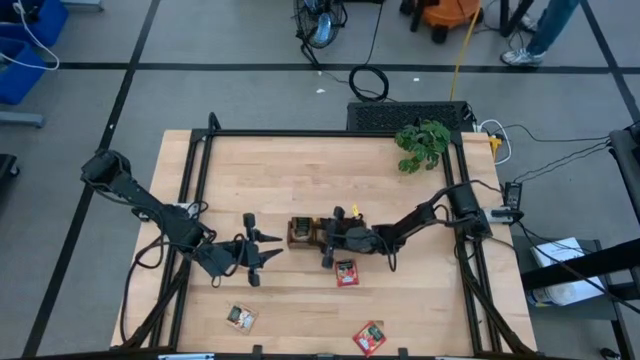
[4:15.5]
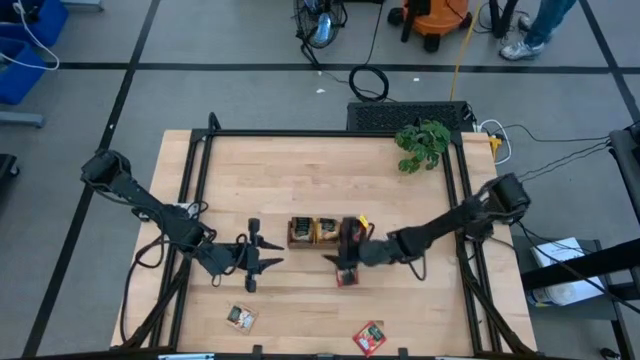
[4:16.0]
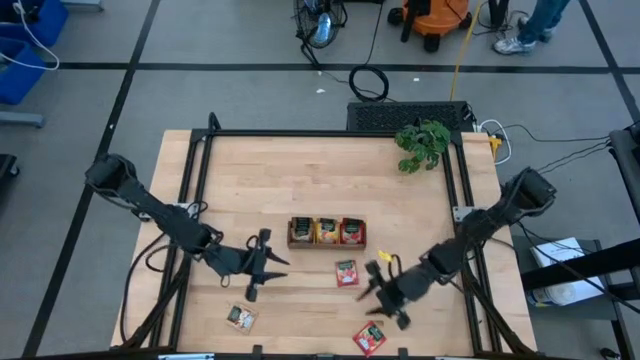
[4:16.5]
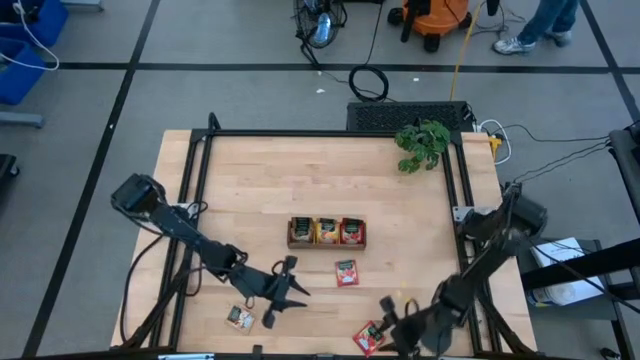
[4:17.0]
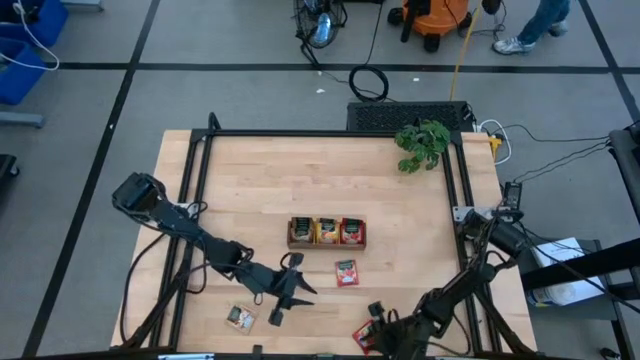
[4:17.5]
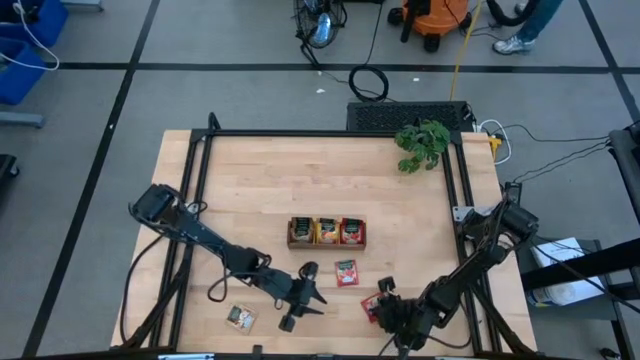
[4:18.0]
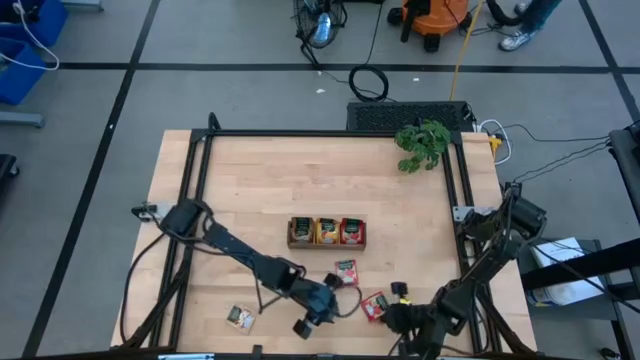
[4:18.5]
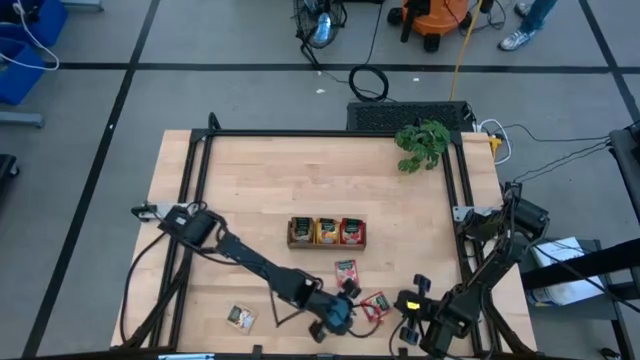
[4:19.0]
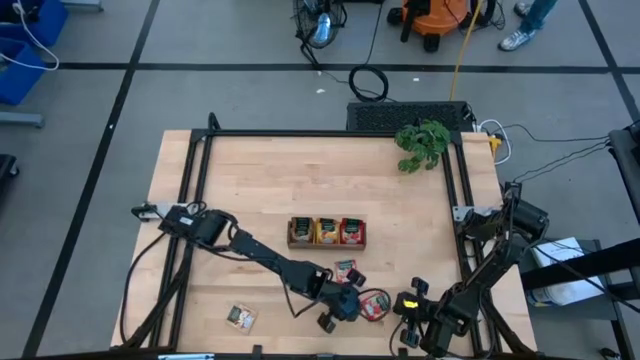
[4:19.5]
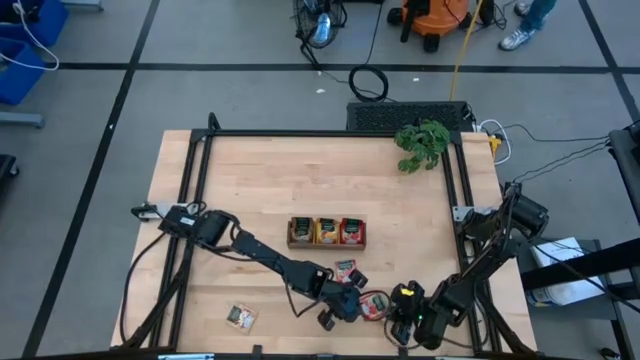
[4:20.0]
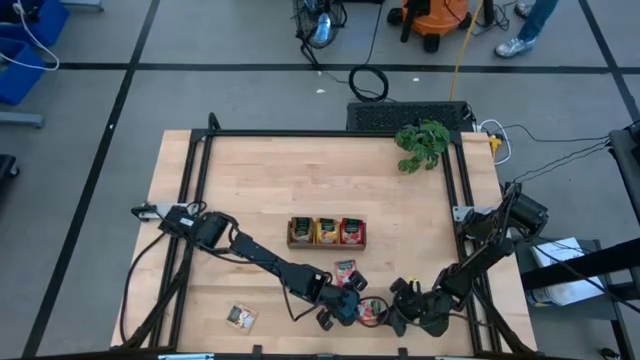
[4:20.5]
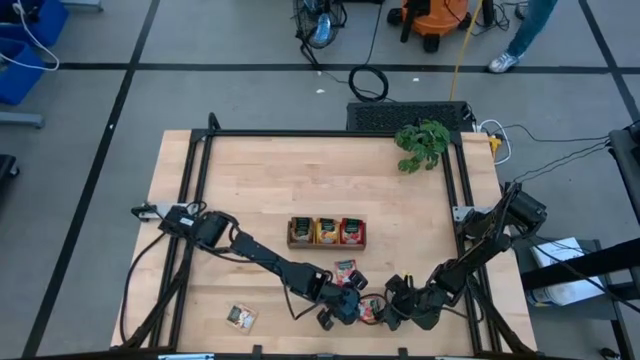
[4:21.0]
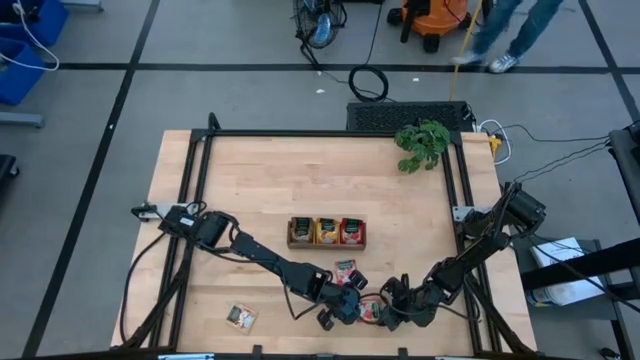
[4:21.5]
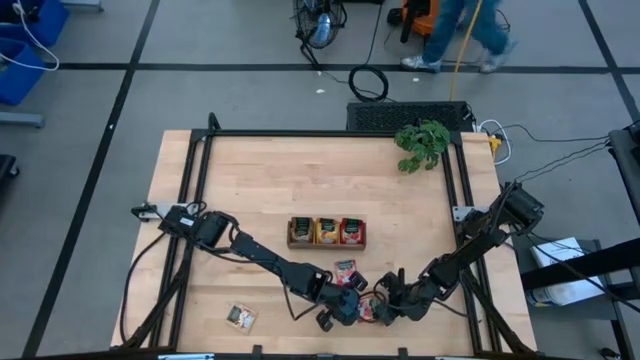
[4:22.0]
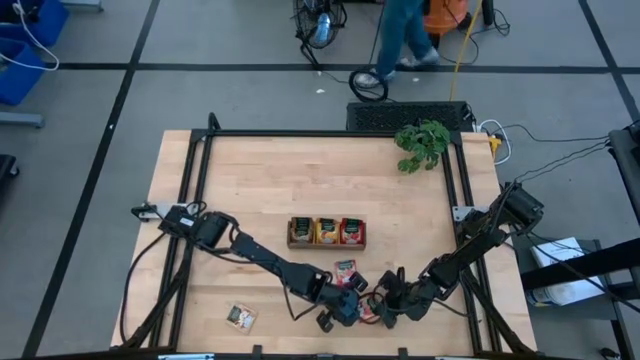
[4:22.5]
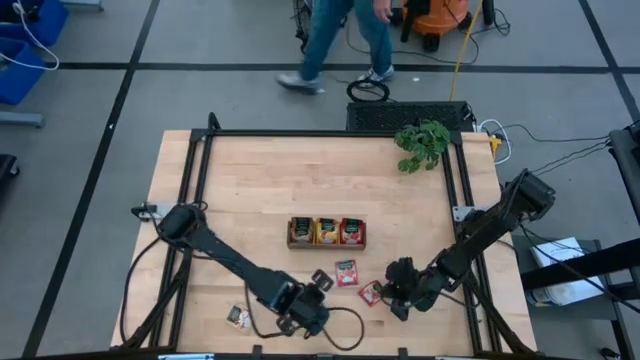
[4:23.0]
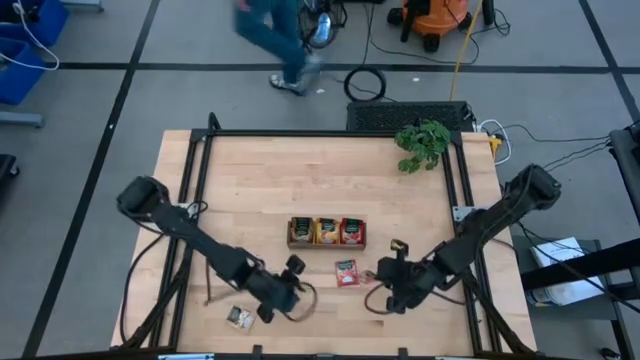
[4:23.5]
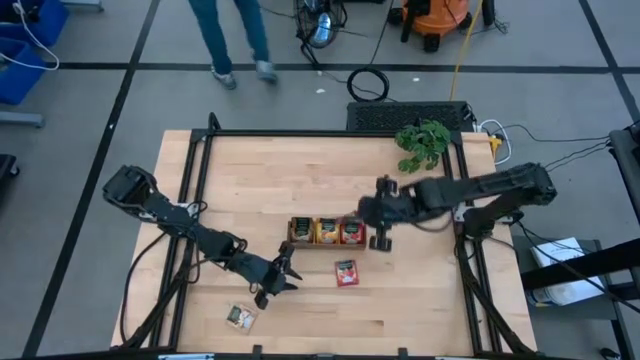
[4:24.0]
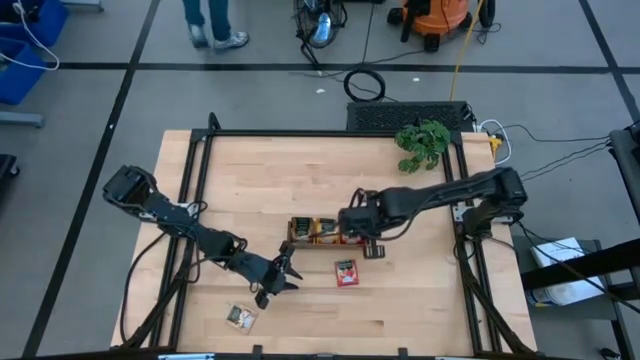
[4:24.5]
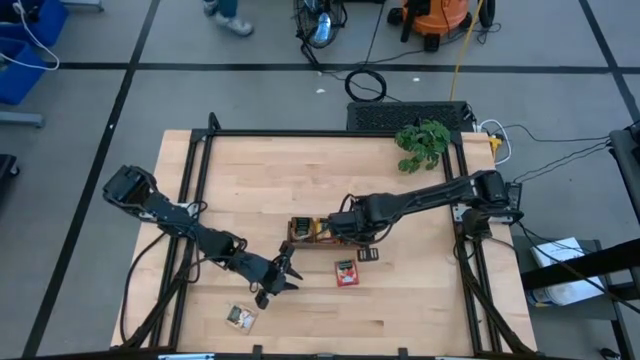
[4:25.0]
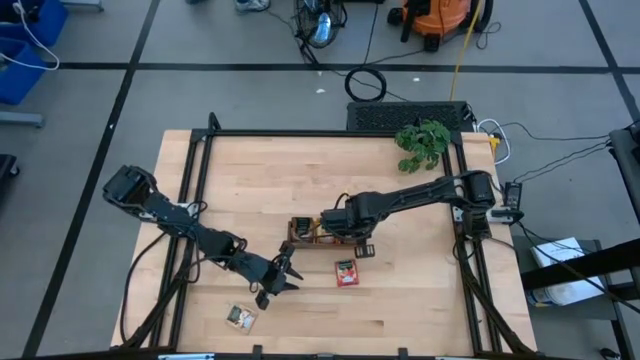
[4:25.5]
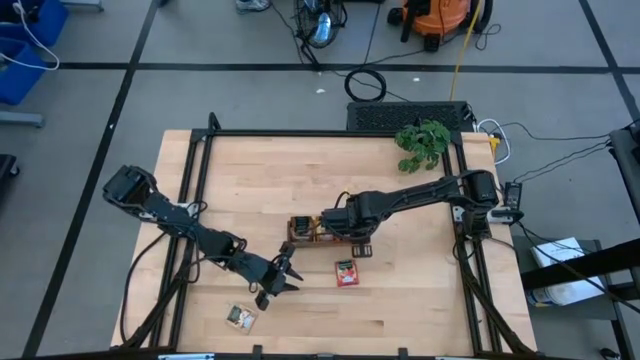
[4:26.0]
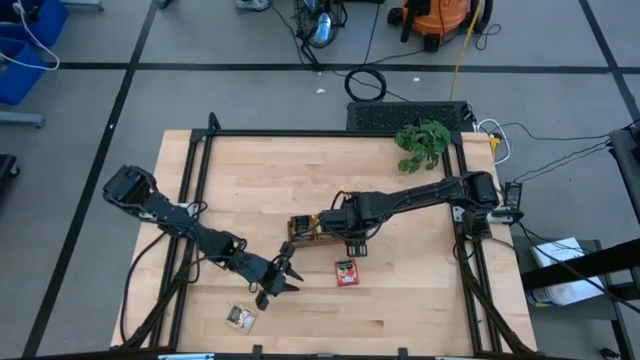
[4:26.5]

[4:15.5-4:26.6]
Task: Pick & Place Tea
Put the red tea bag into the right section of the wooden organizer

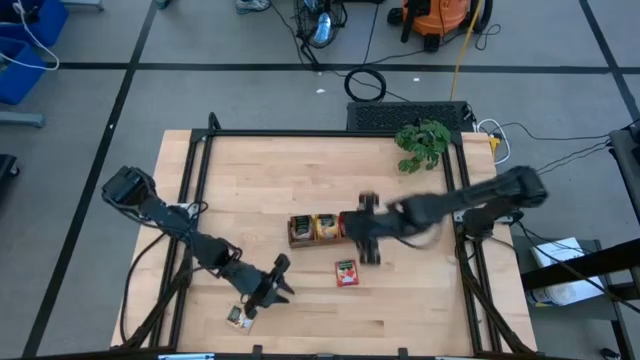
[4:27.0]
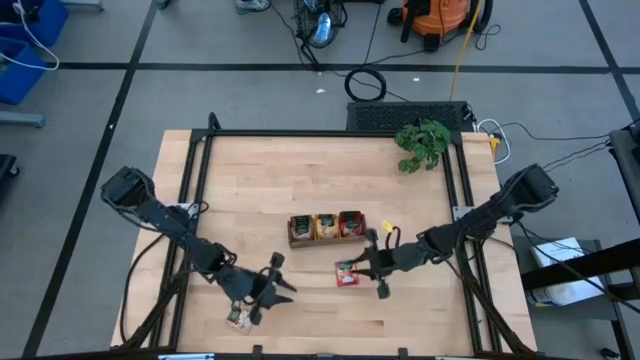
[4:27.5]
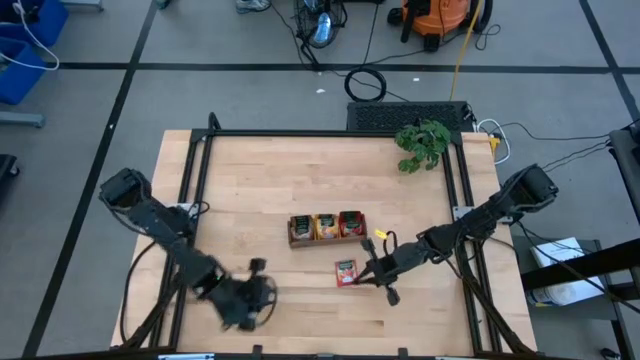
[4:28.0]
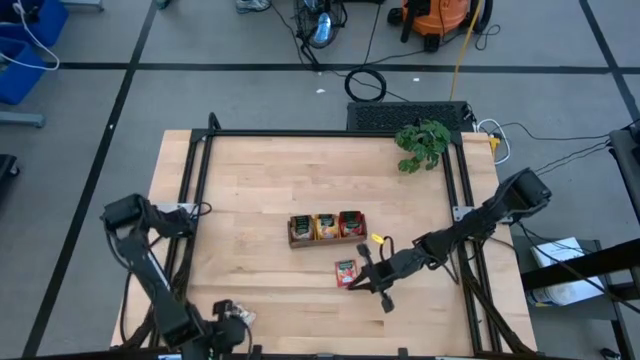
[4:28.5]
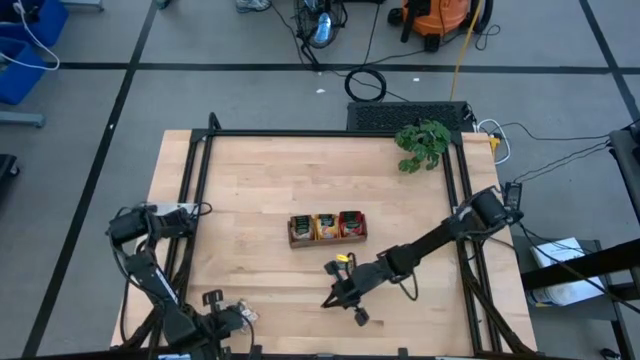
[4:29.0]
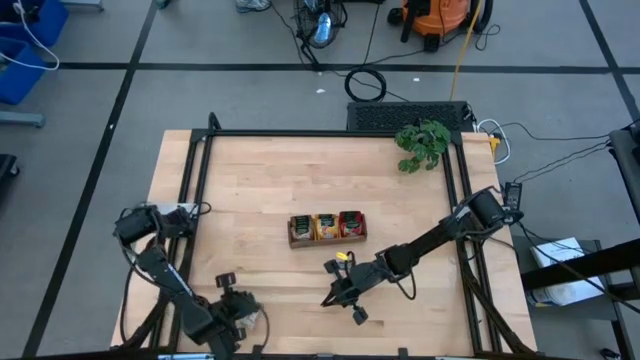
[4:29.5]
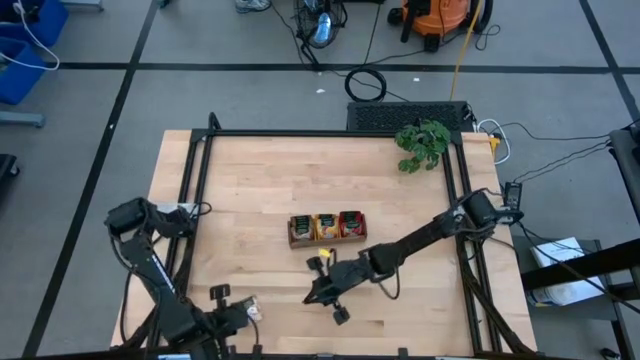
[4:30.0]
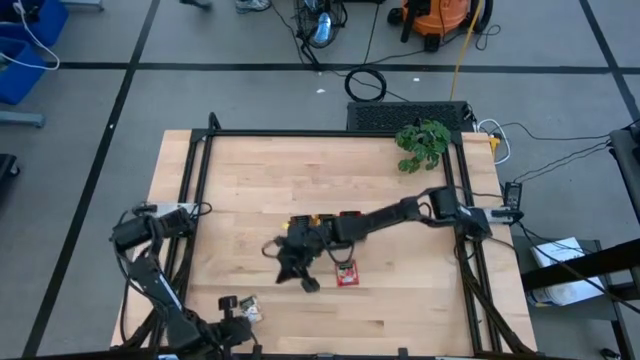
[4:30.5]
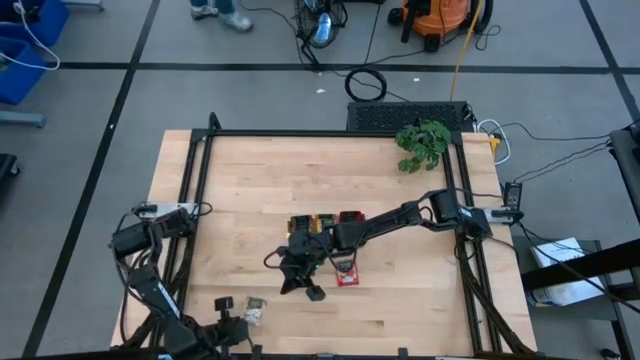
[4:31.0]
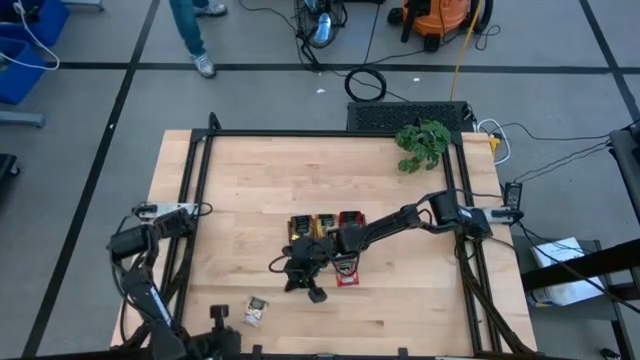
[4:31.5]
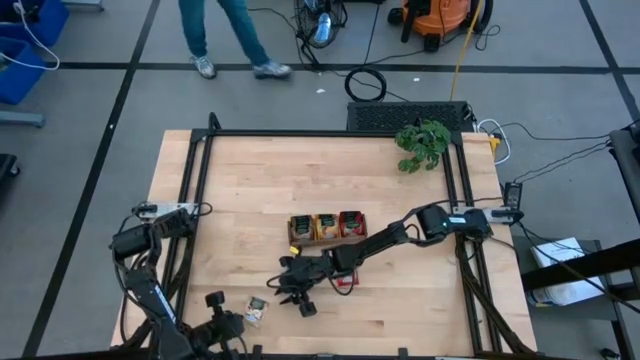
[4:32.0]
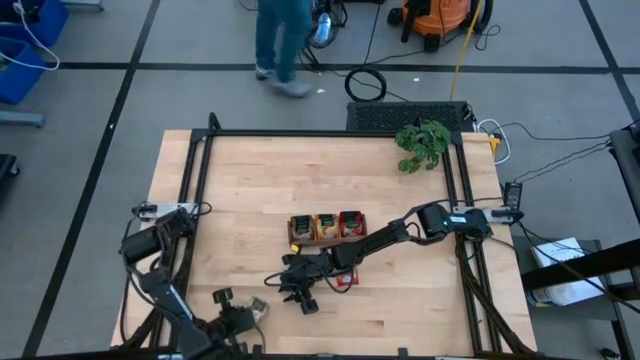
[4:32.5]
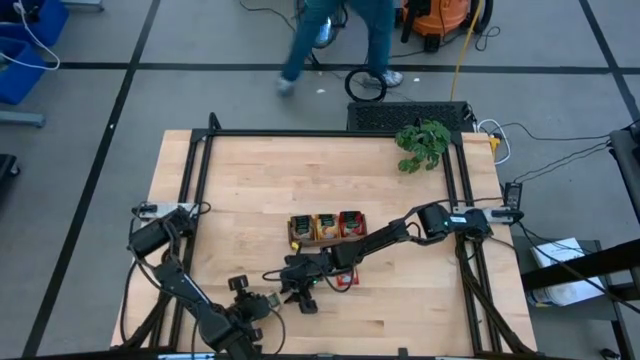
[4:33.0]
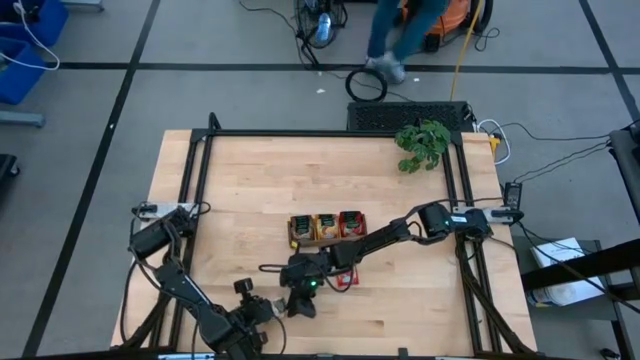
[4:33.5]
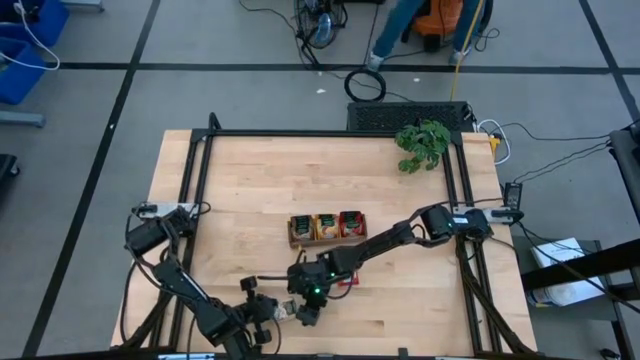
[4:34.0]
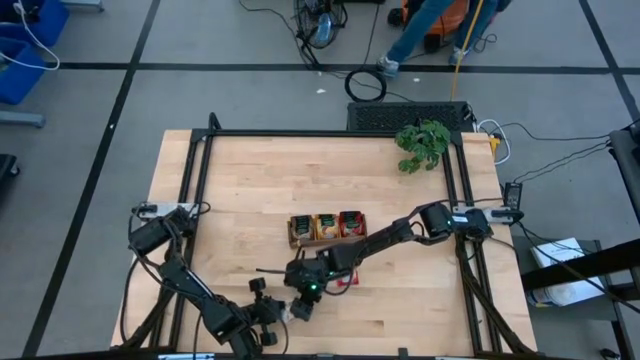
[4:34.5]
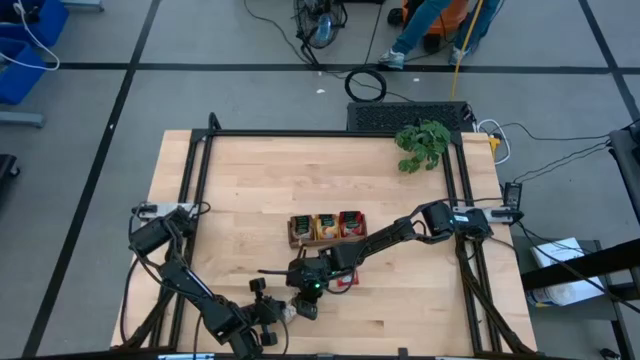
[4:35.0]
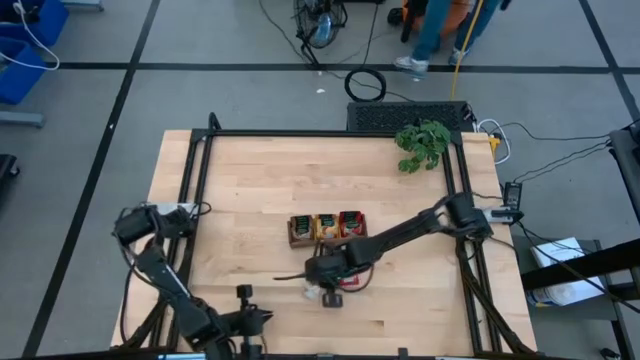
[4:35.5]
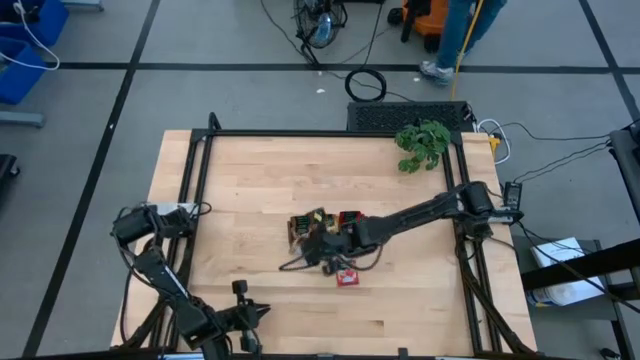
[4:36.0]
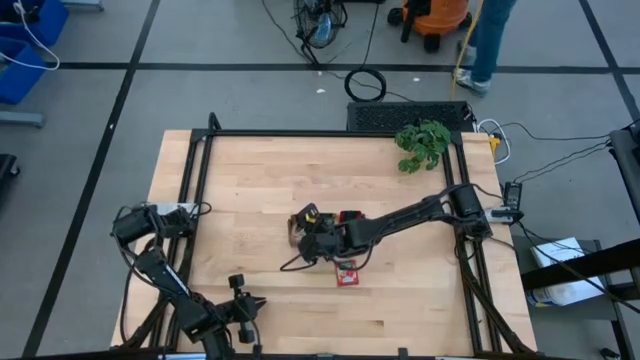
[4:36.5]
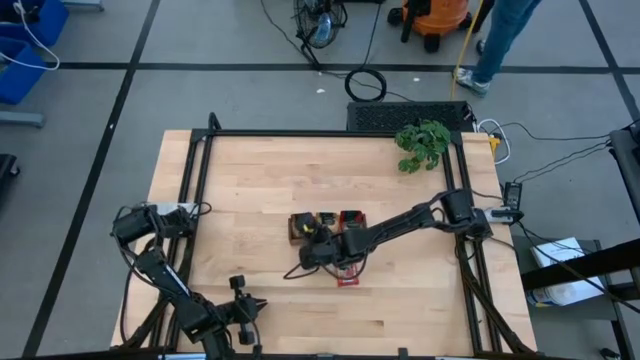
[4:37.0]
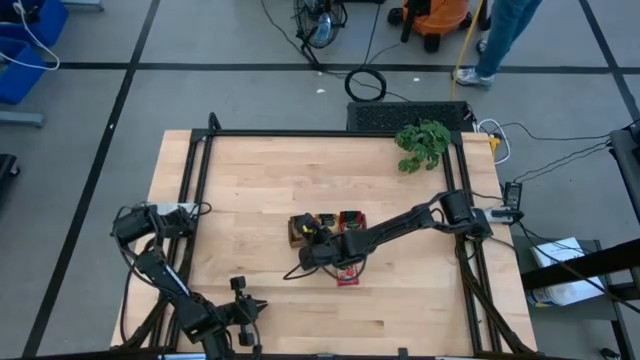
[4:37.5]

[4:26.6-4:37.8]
Put the brown tea bag into the left section of the wooden organizer
